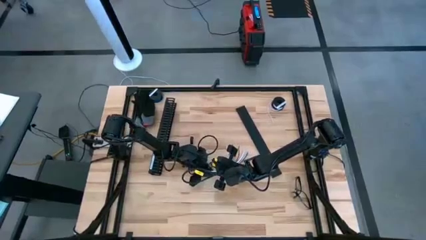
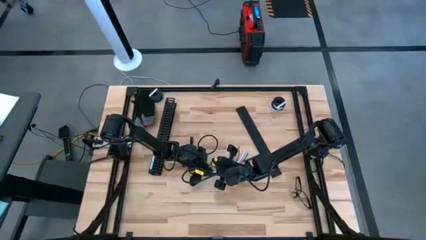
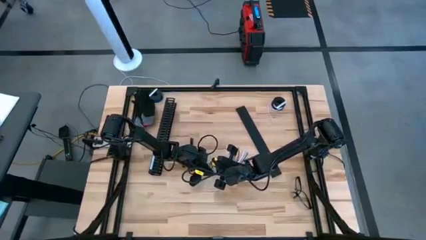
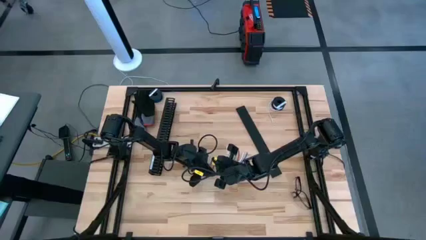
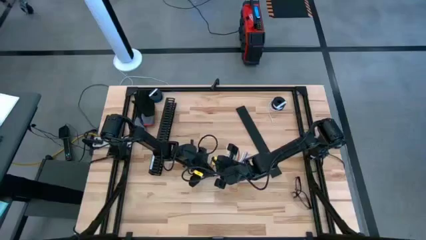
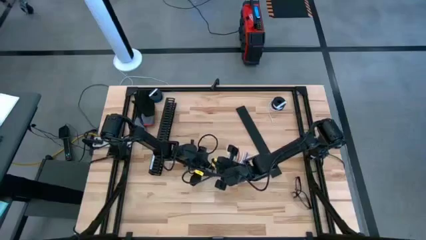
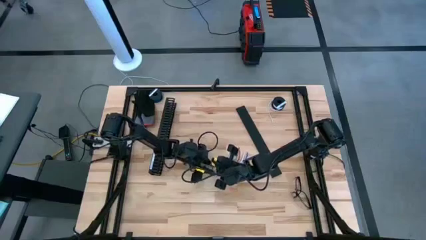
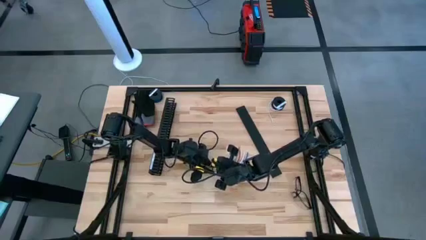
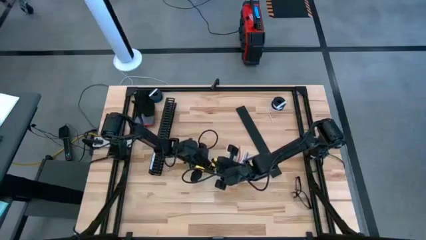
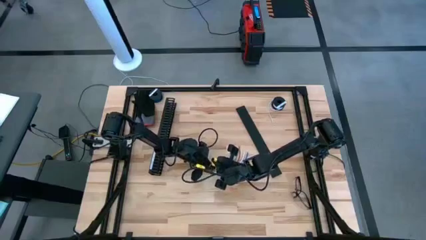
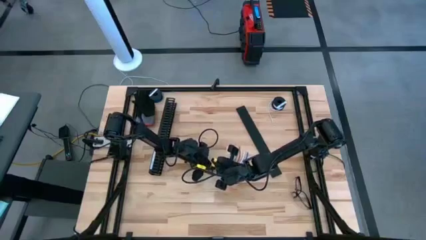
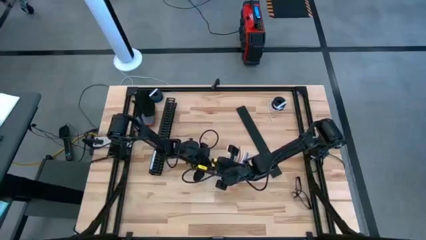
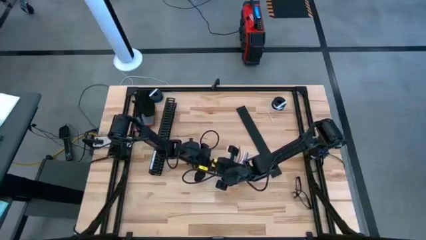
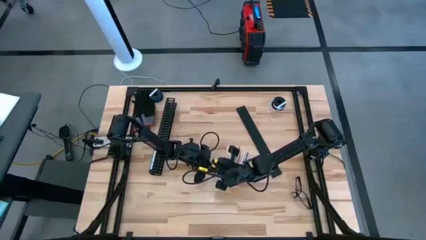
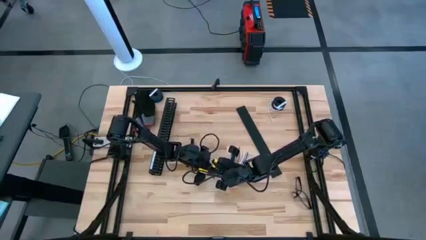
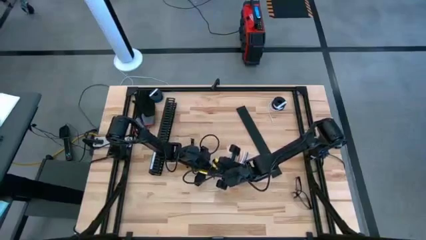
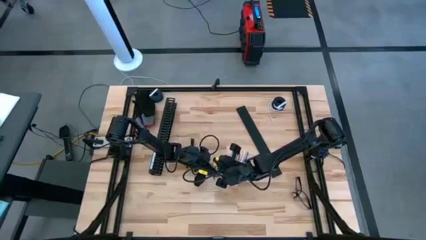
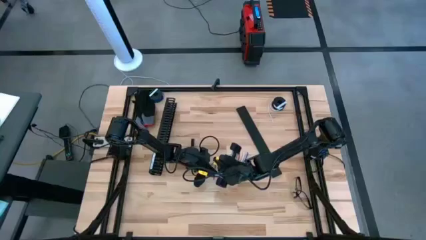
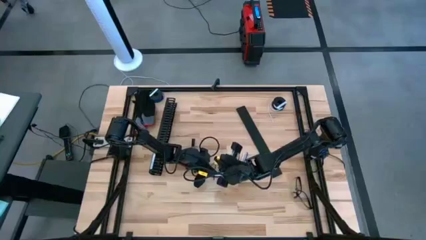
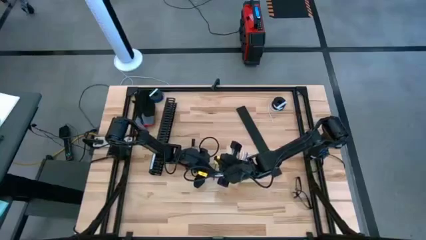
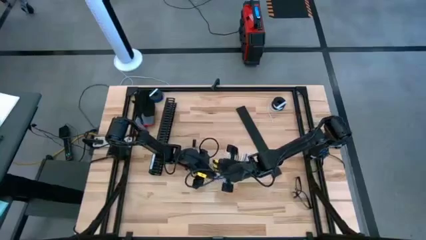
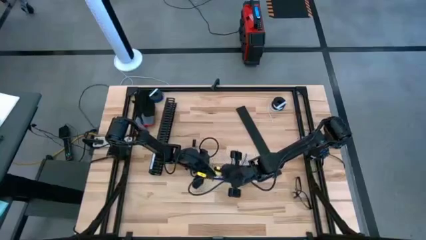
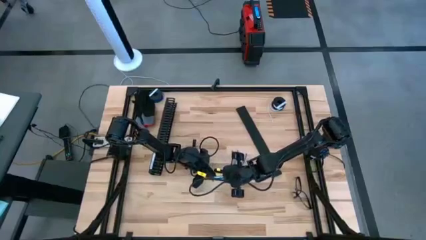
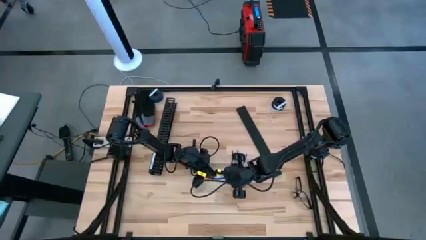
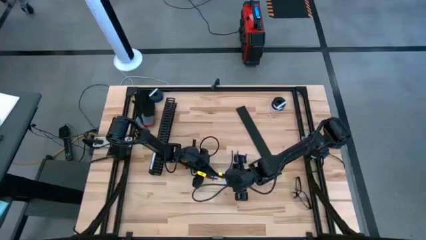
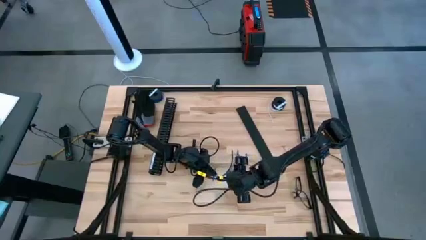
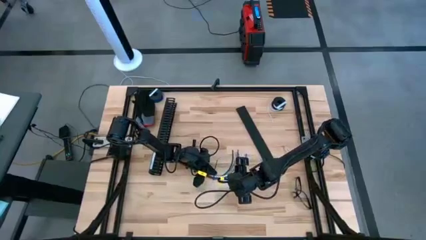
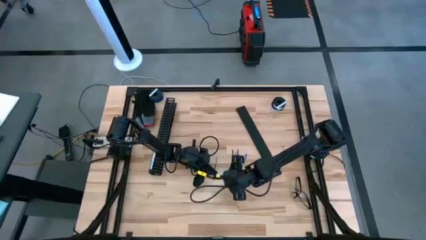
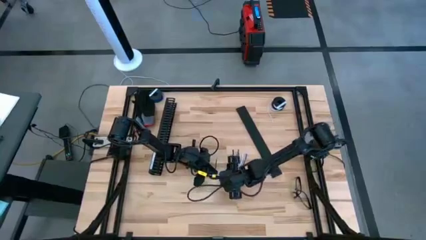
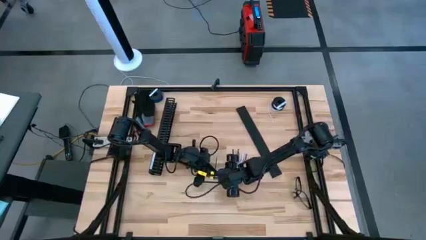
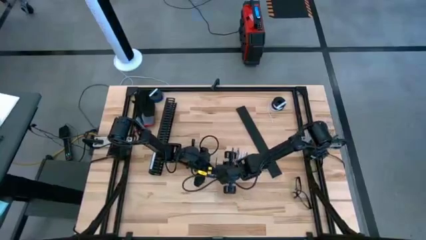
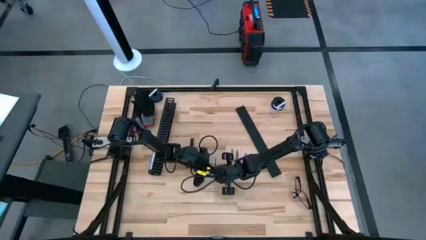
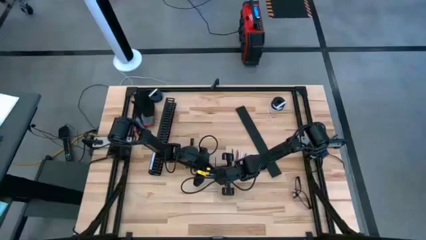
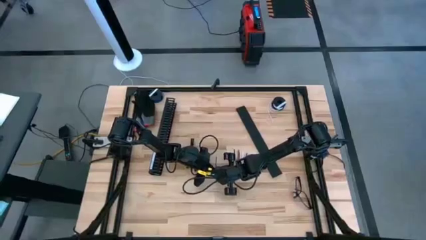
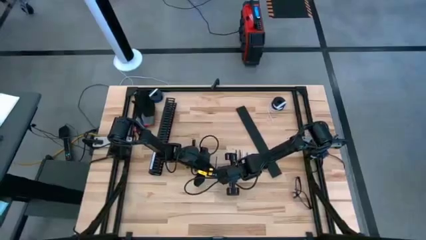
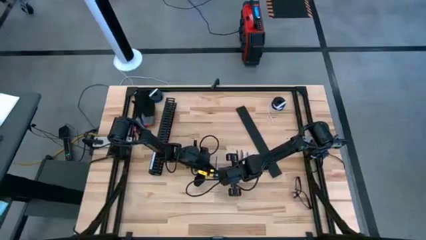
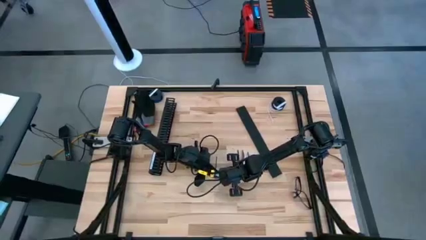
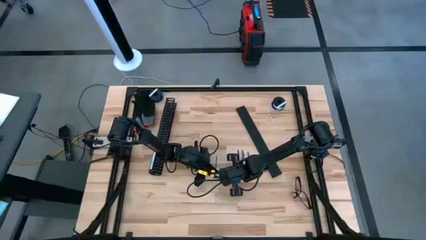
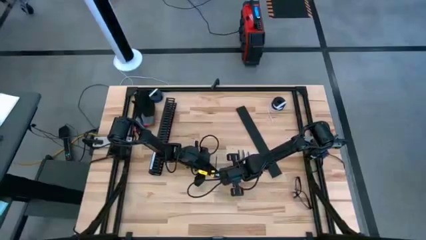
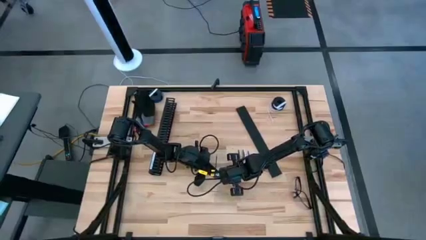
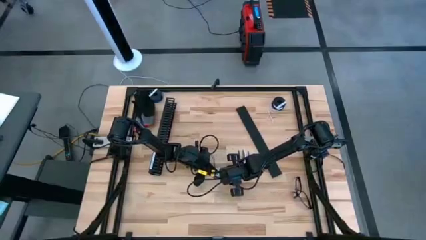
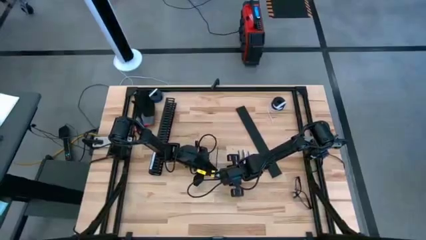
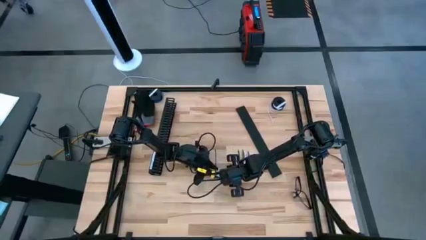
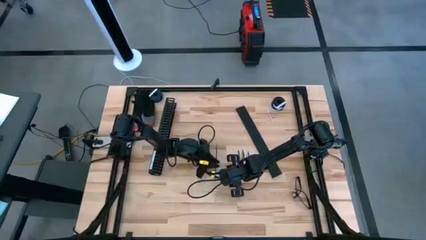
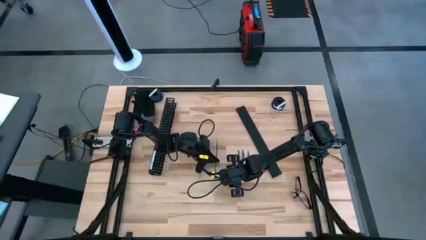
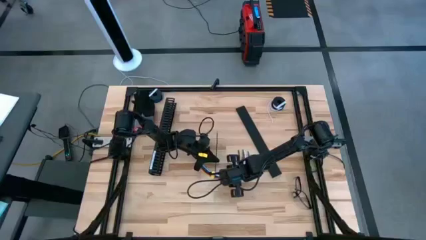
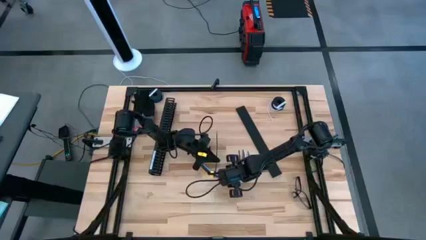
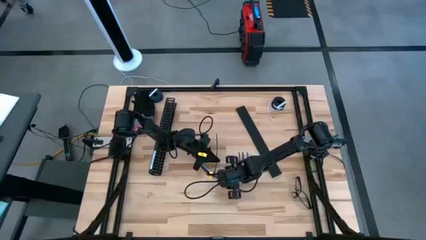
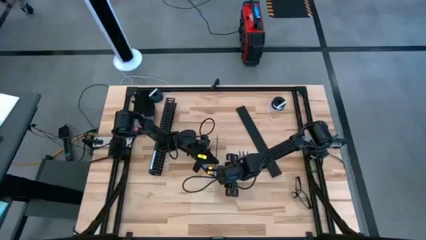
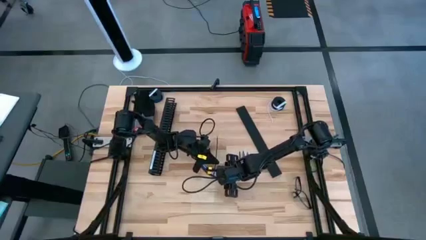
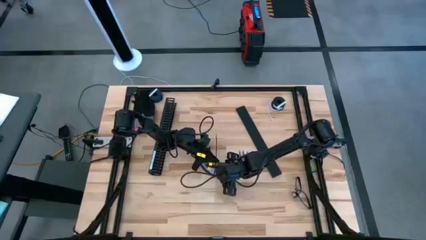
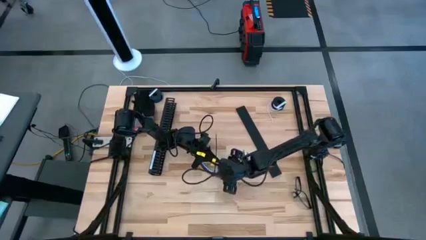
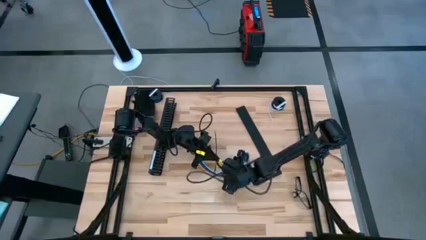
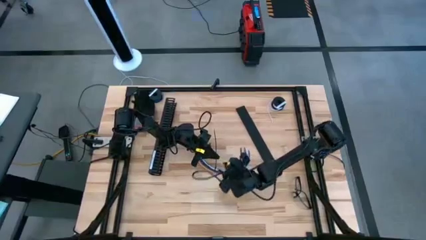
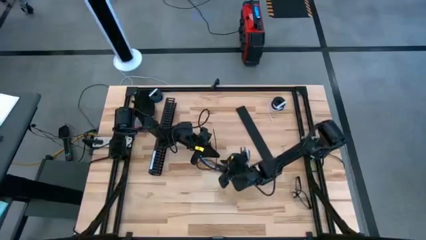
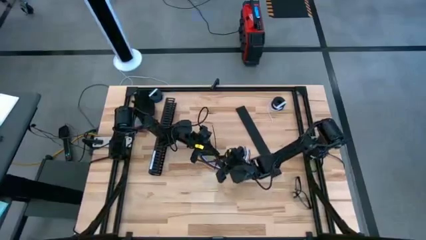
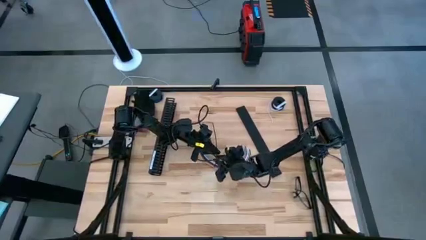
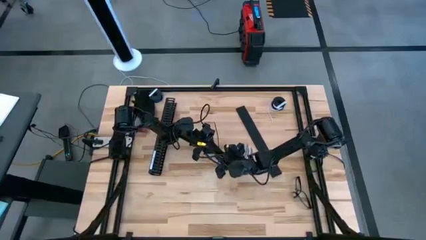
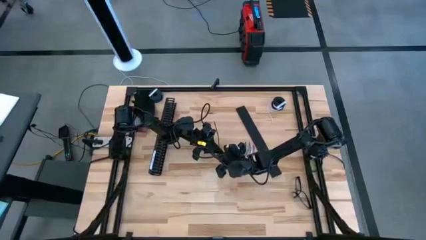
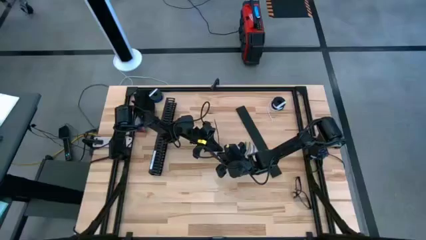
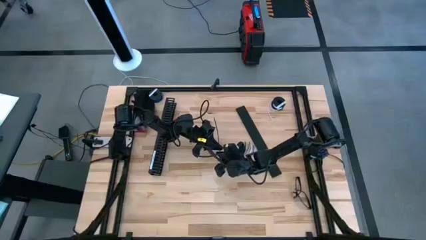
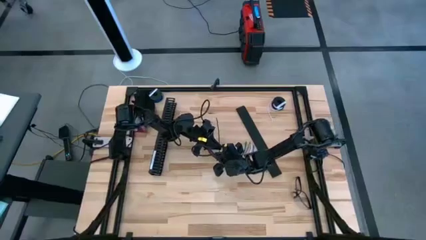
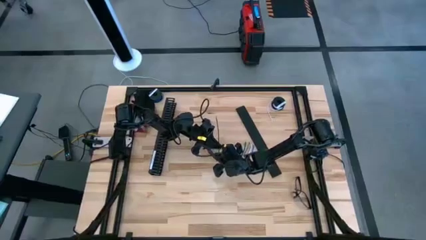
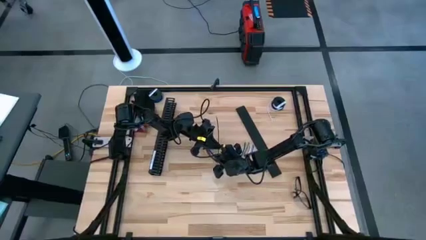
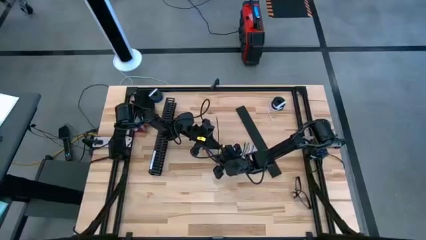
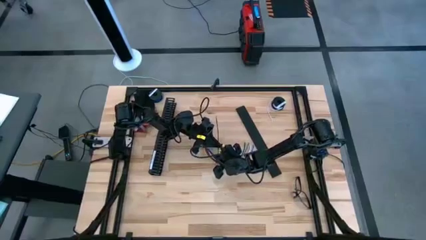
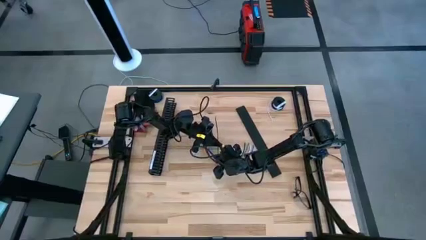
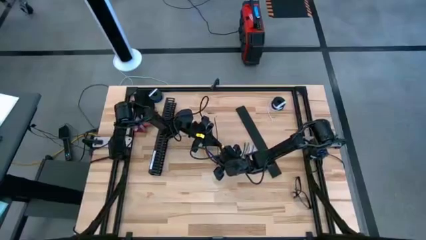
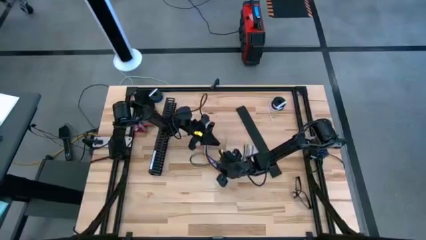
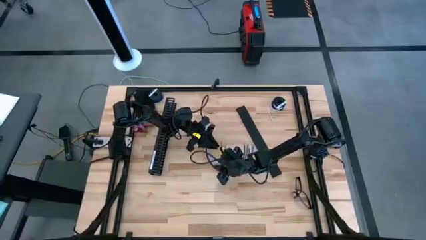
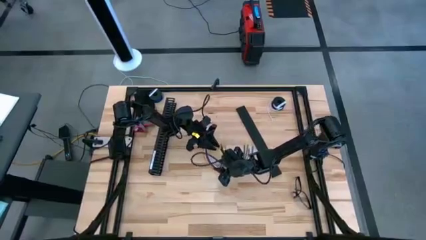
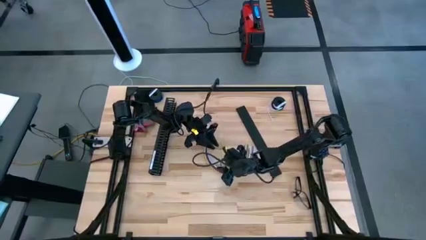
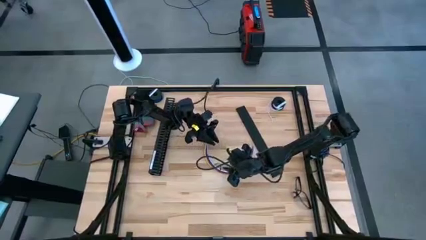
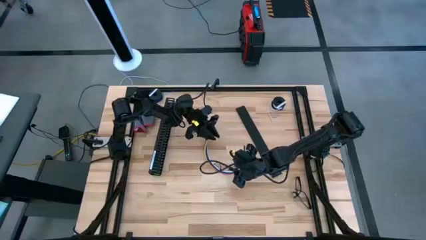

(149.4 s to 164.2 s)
Task: Ziptie cables
Wrap the black zip tie on the cable

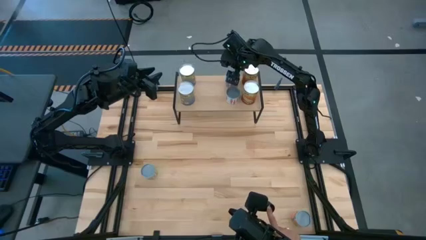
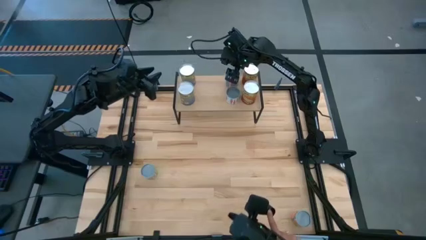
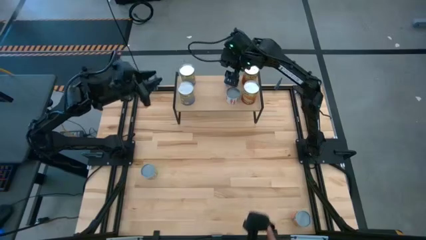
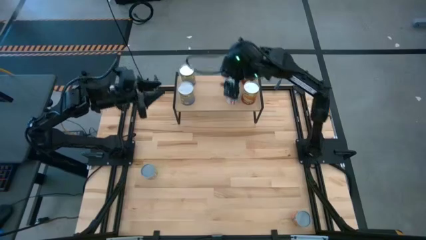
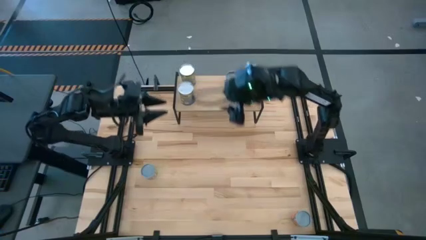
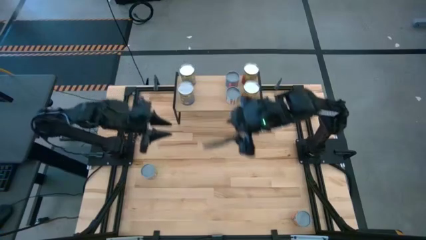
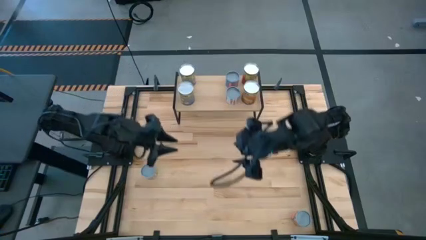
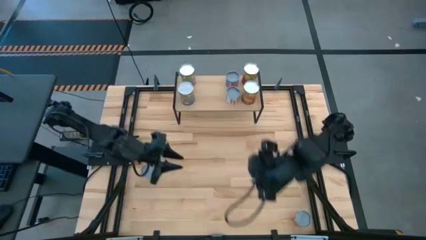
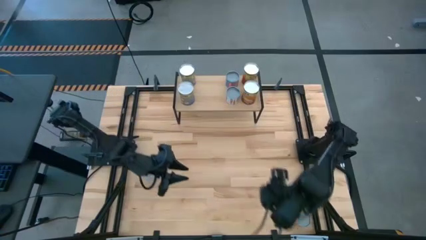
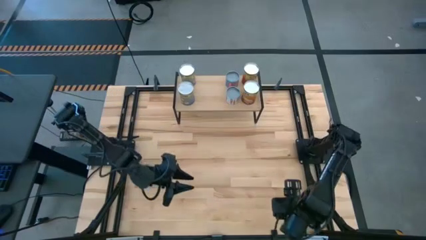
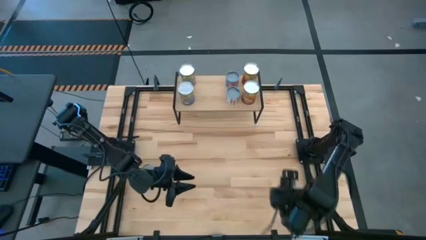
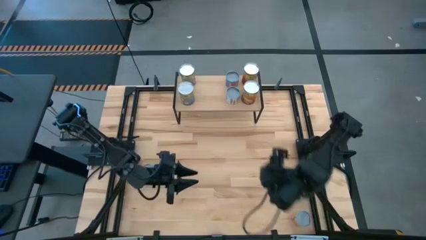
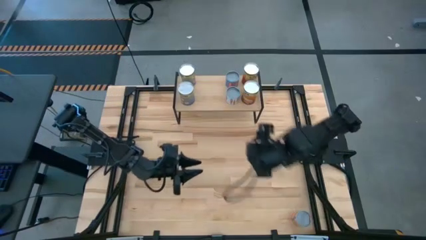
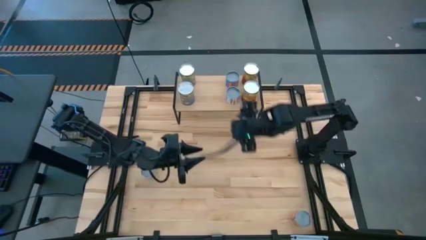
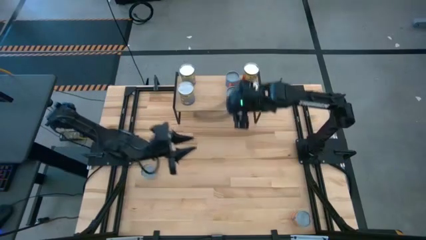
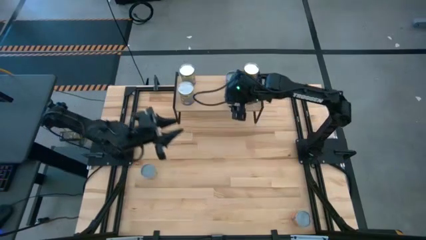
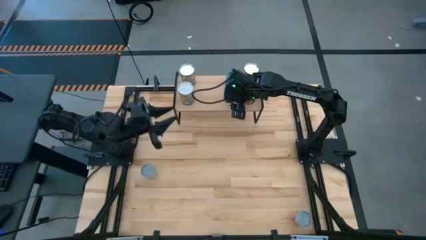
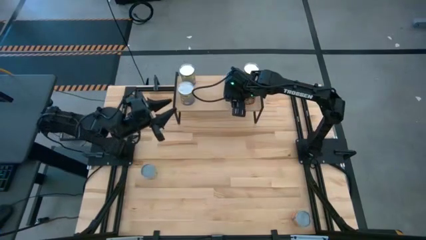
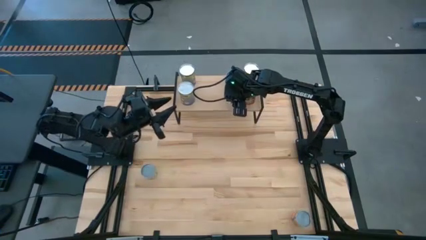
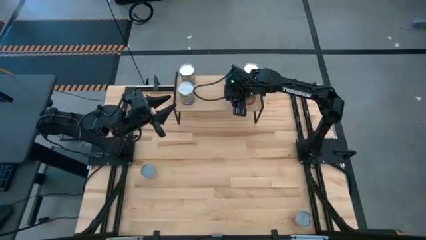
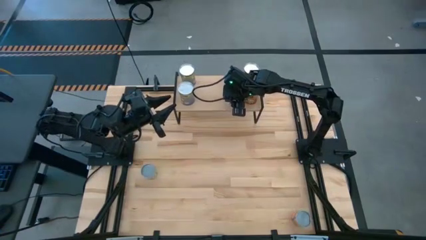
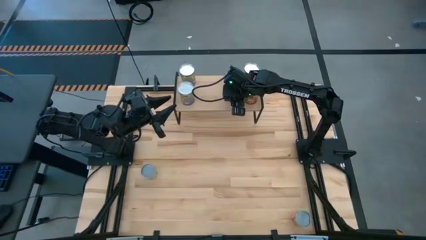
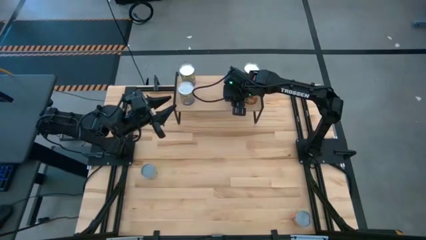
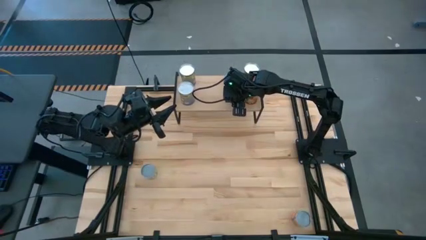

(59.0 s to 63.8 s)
Task: Pick and place cans onto a shelf
Adjust the canned carrot on the shelf
